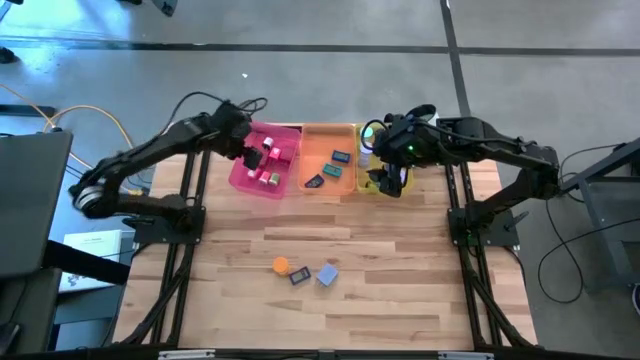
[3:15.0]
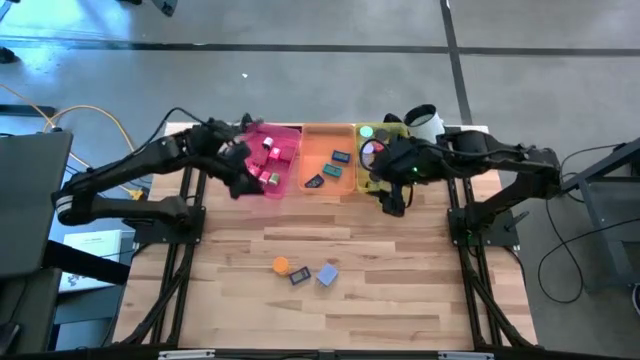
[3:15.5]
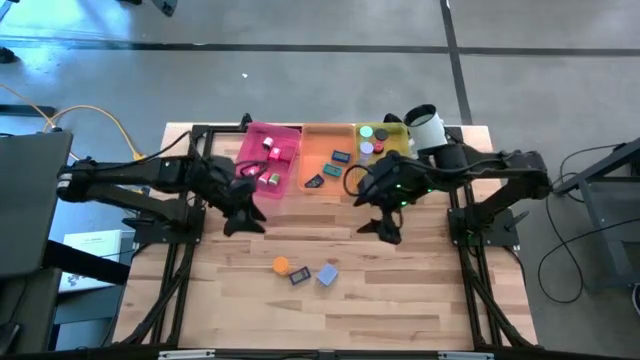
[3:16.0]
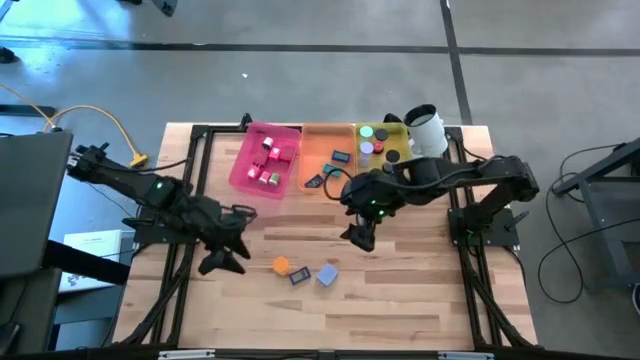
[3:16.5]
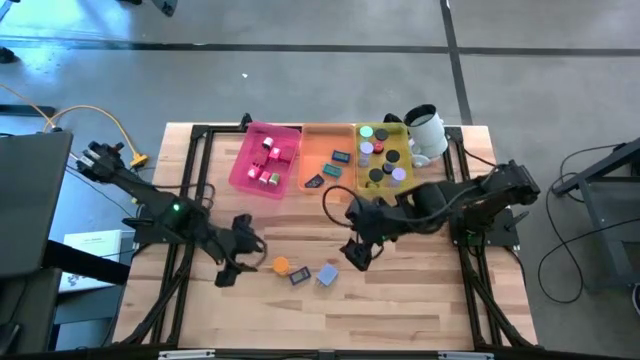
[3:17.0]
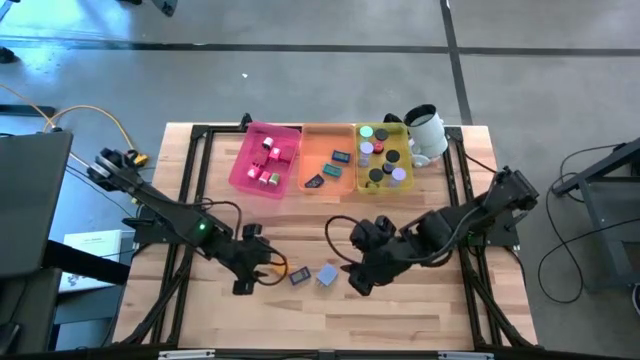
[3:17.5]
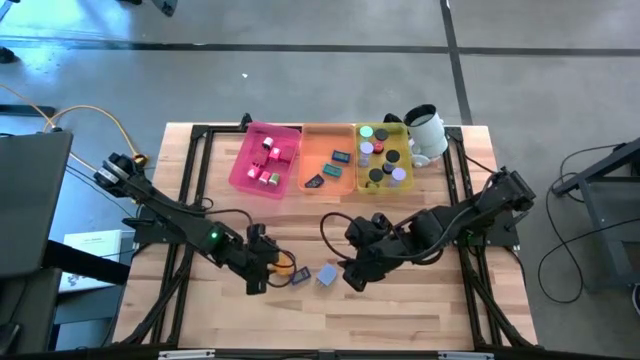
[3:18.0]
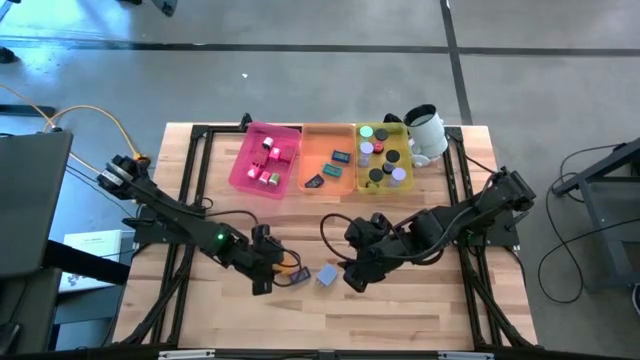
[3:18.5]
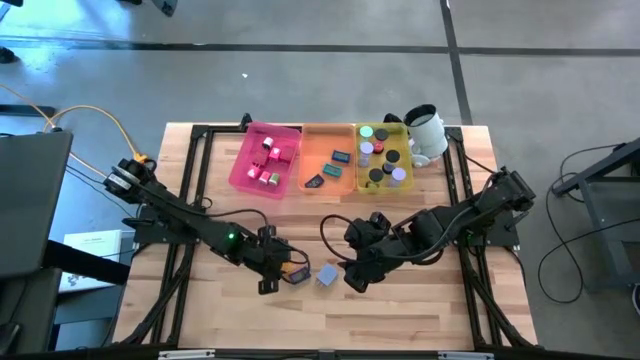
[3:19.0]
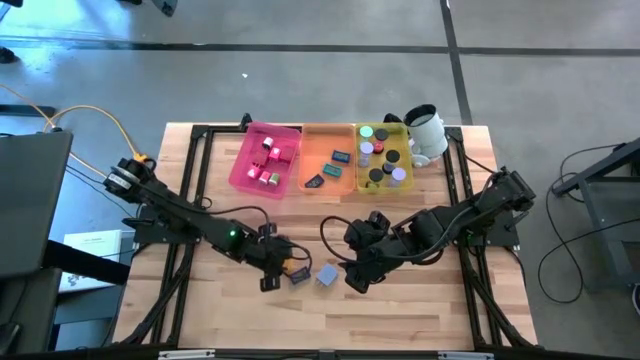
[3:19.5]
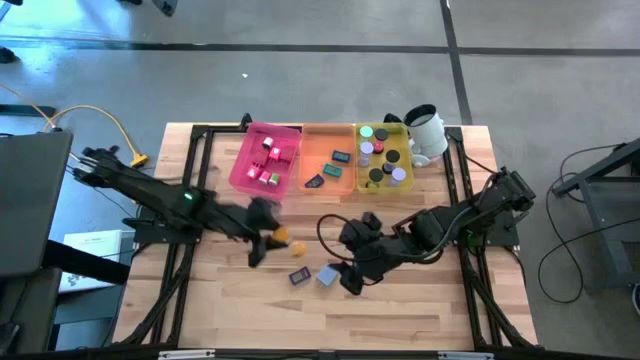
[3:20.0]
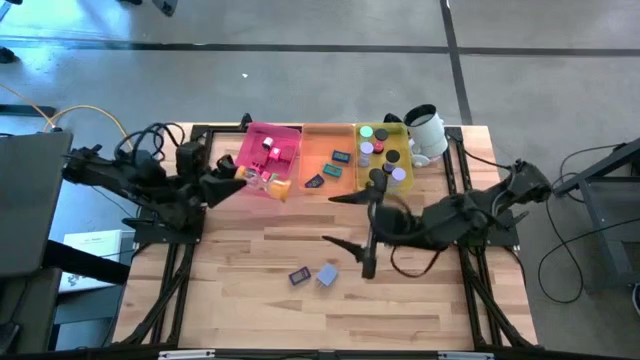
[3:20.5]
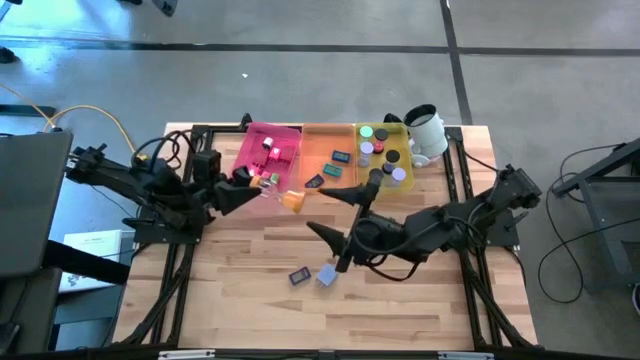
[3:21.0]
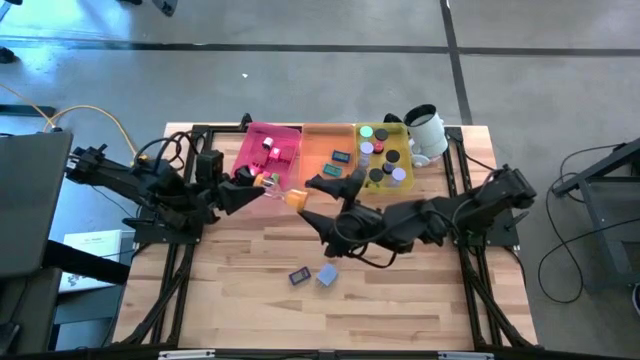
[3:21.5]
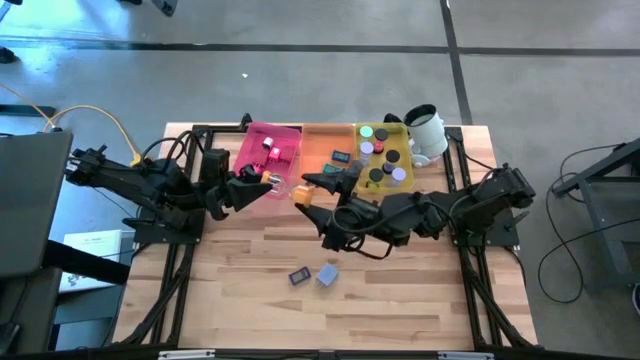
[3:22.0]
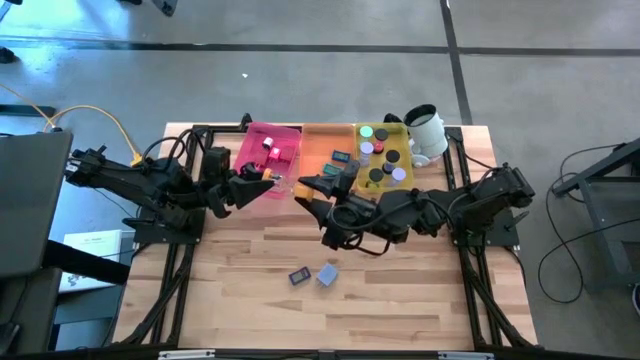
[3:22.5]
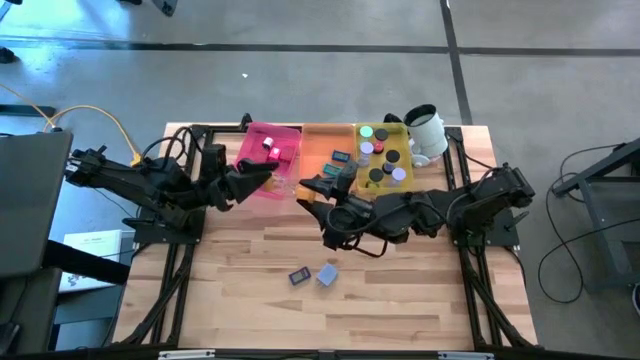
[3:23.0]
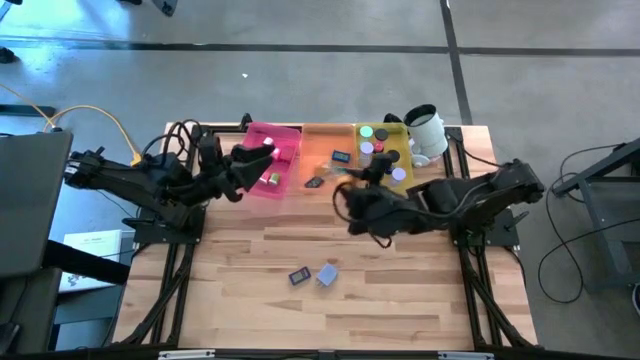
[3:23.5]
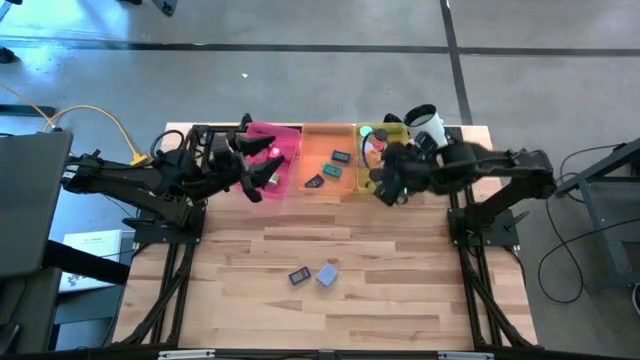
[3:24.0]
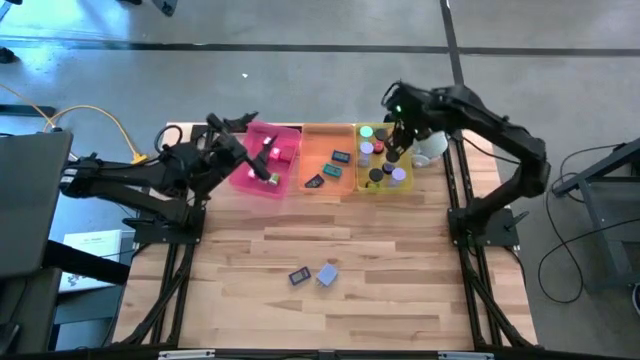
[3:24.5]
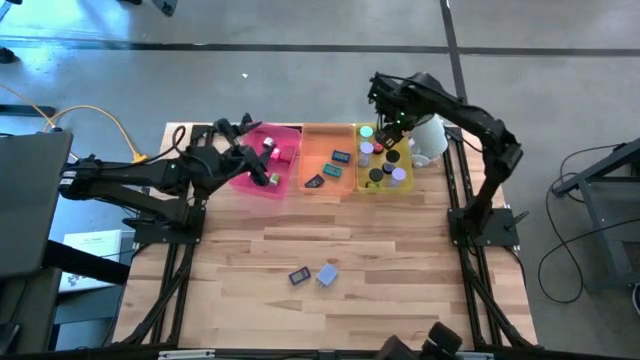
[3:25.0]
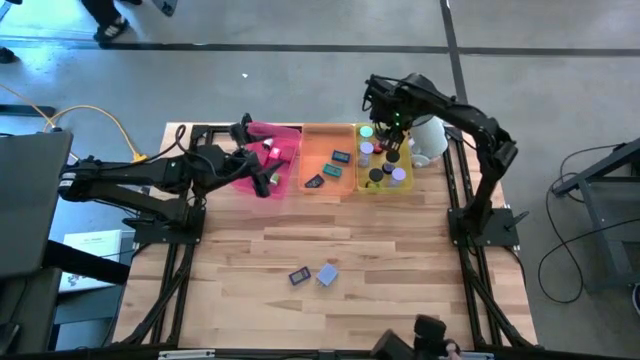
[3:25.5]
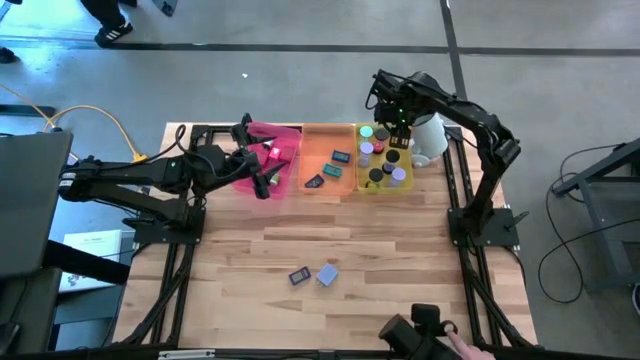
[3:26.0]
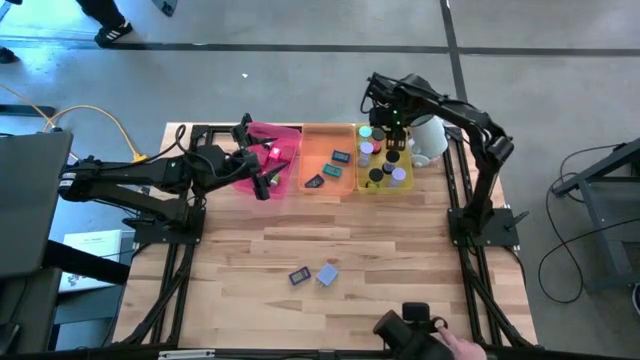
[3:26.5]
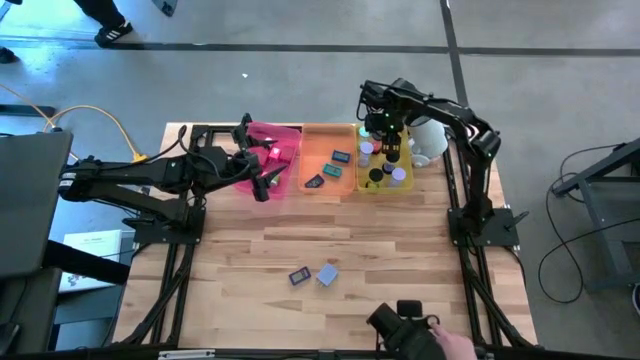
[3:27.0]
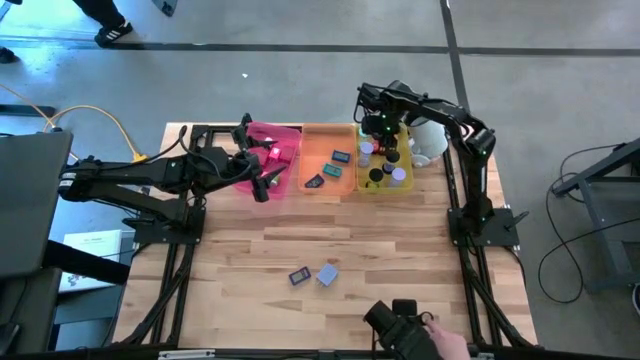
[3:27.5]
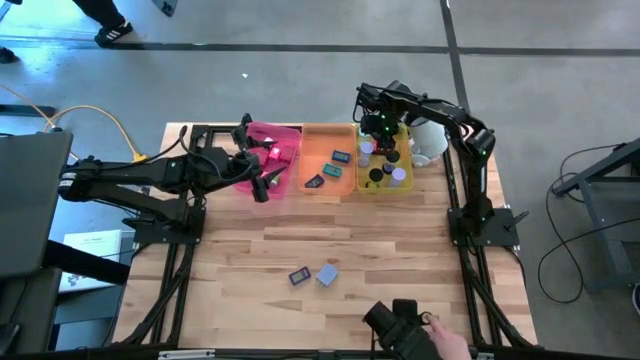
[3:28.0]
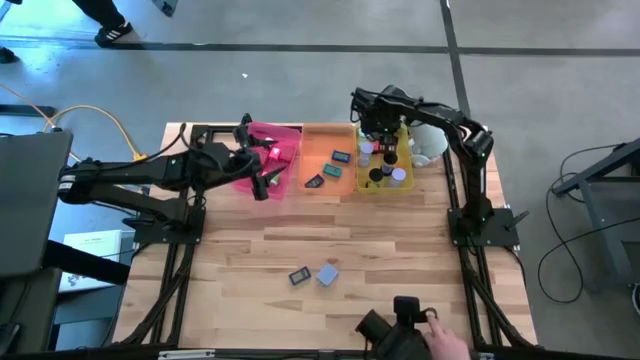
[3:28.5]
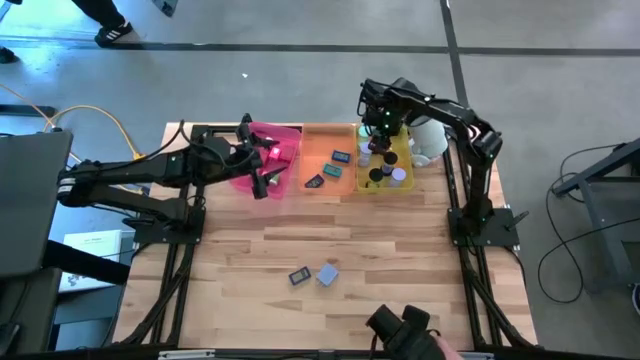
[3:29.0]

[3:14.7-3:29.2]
Task: Pick & Place Office items
Put the yellow hourglass into the yellow bin

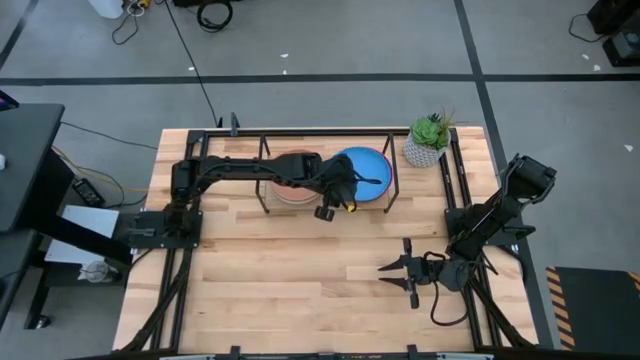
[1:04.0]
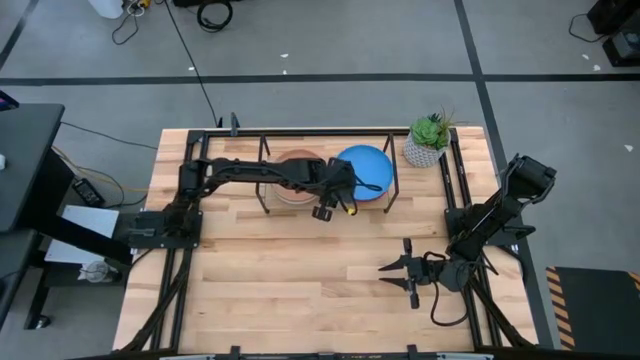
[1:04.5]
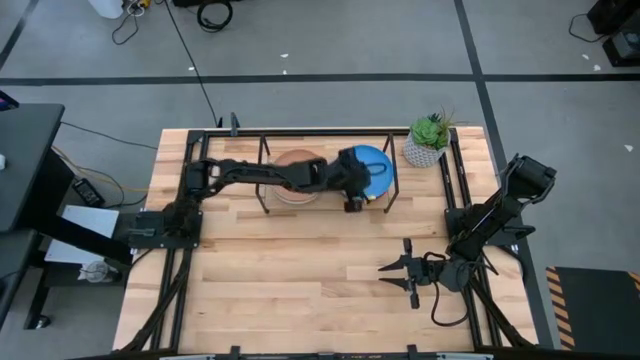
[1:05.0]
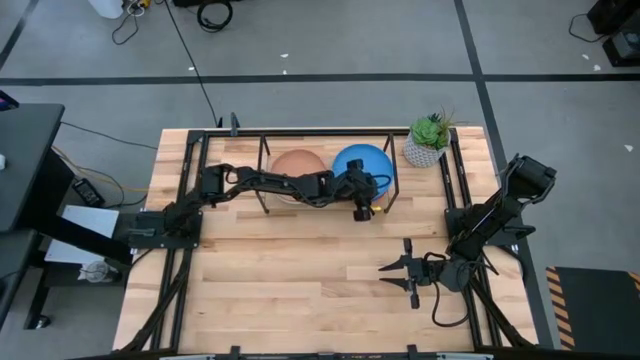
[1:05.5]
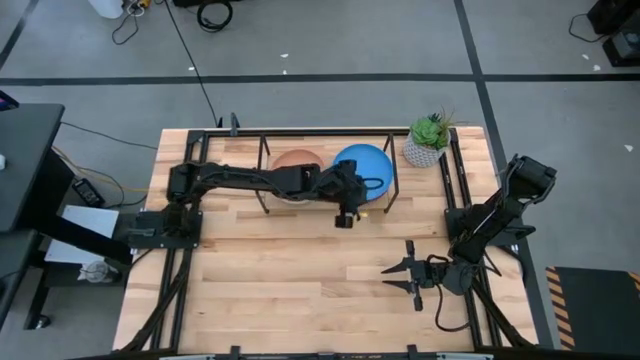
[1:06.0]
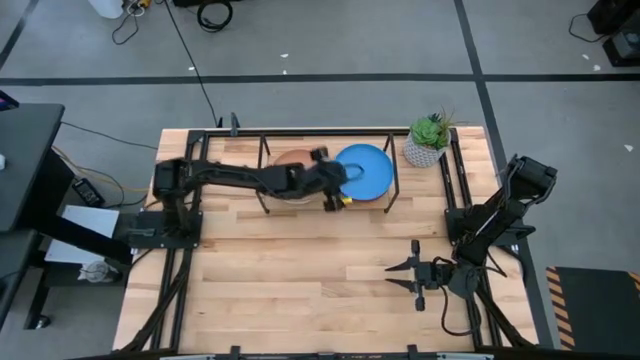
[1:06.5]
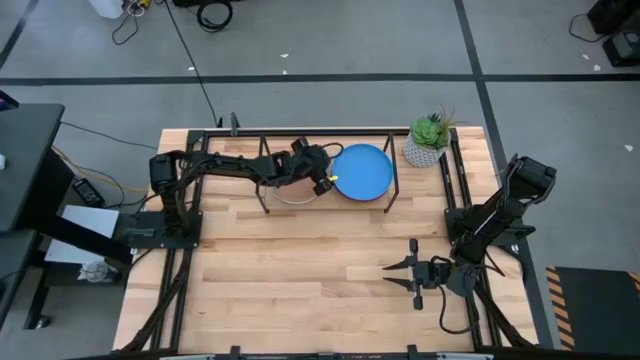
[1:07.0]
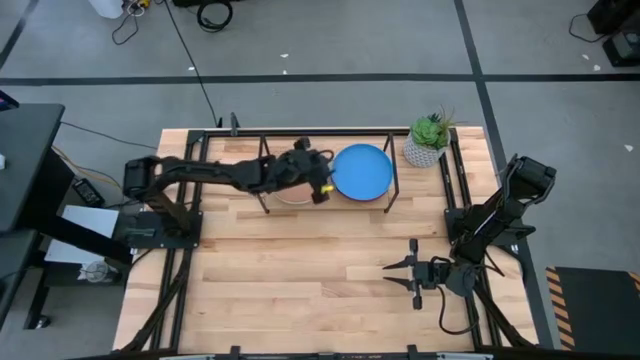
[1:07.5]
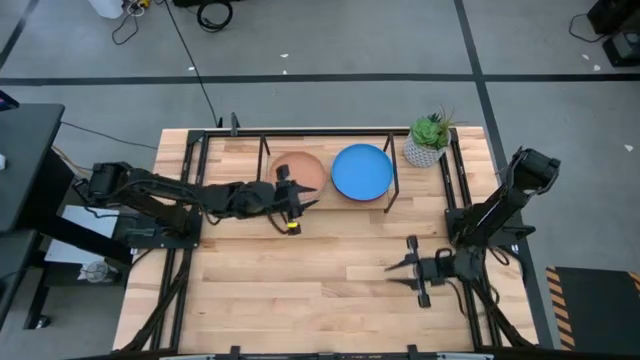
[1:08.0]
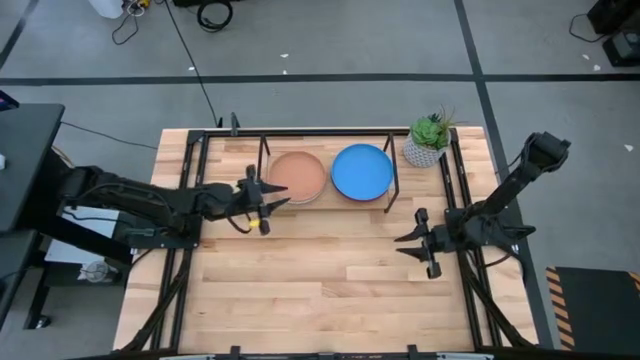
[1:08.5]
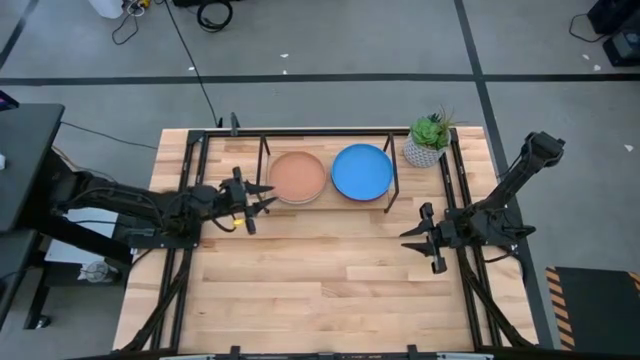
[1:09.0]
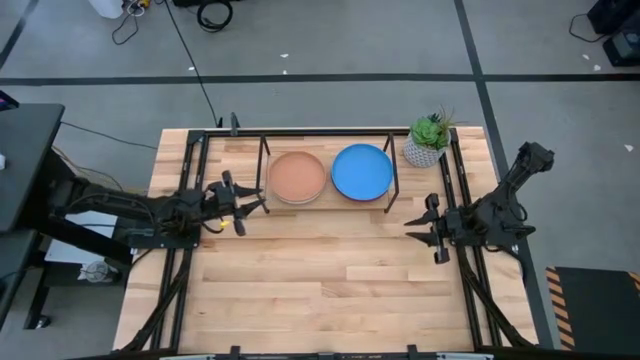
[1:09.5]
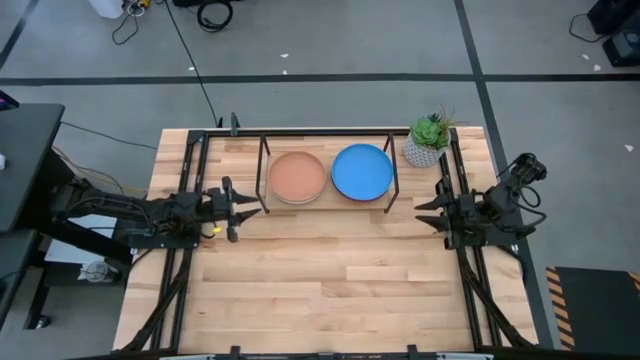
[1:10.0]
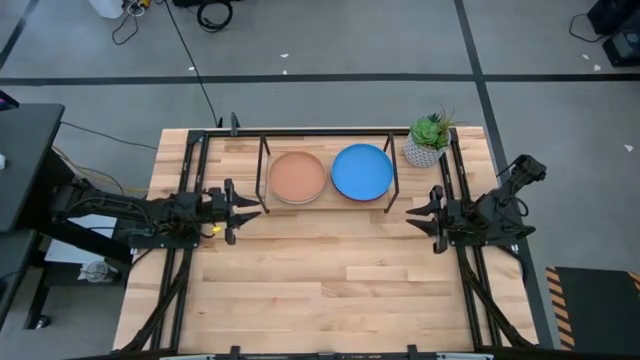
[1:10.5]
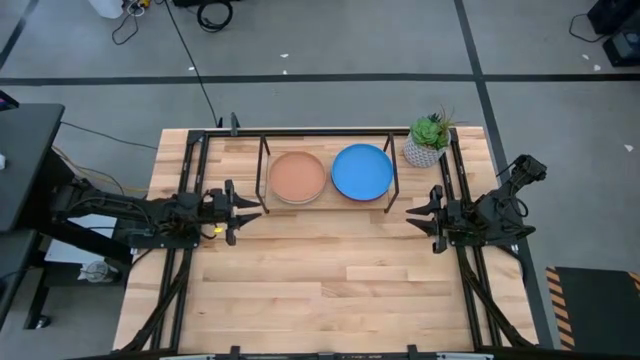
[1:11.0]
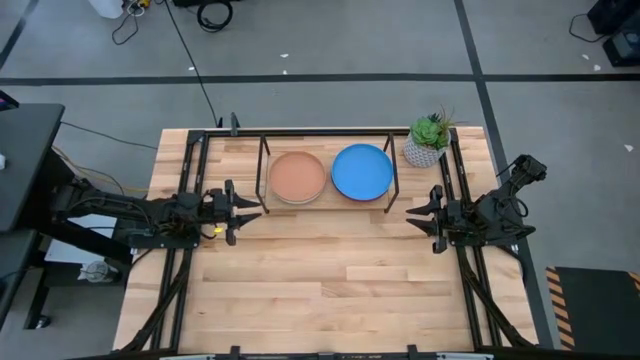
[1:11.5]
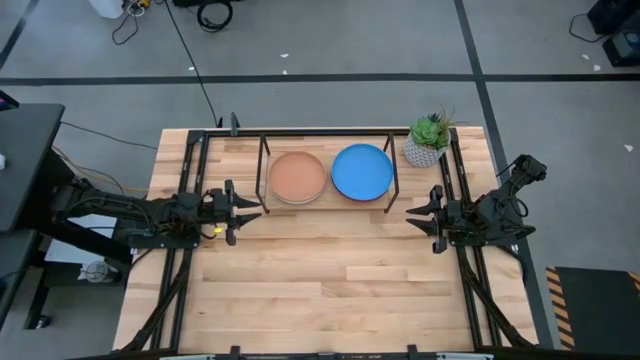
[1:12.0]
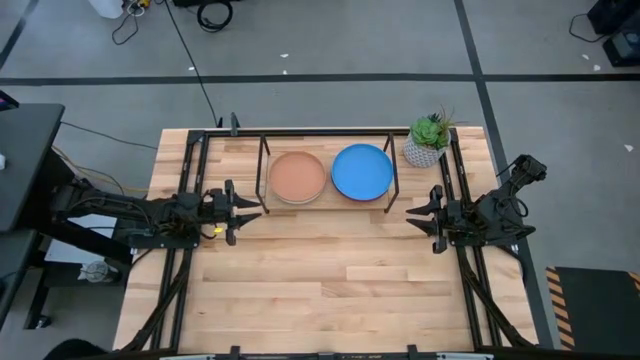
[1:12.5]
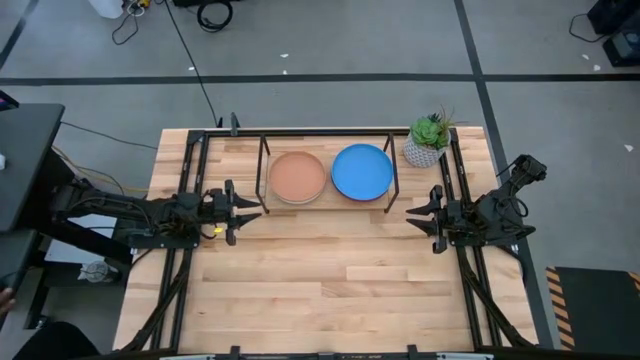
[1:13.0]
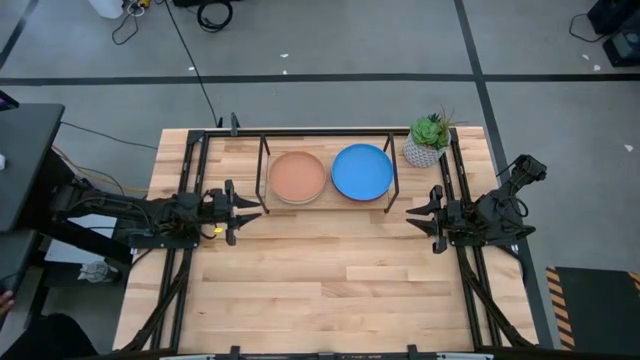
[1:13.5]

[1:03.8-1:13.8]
Task: Place and stack plates onto a shelf
Return to Home Position
